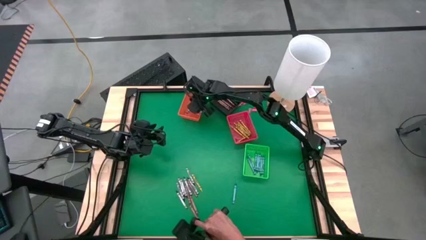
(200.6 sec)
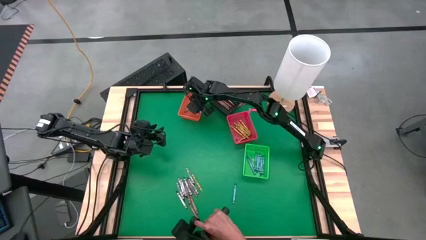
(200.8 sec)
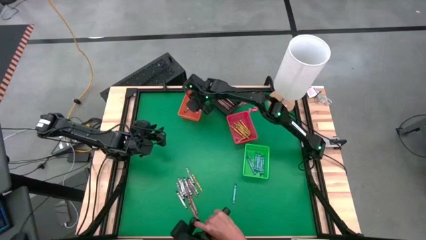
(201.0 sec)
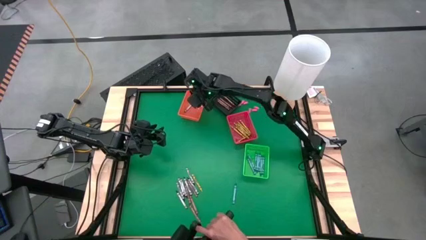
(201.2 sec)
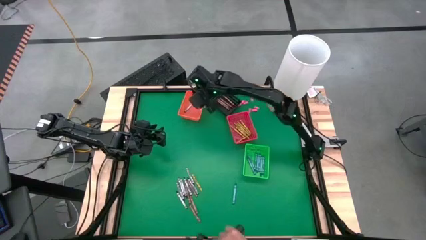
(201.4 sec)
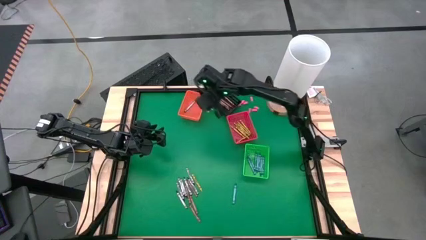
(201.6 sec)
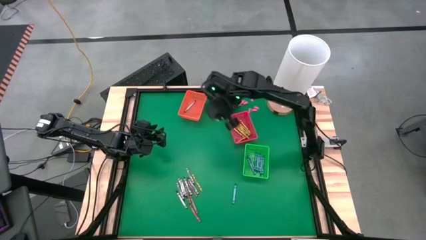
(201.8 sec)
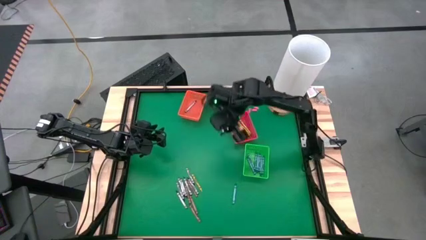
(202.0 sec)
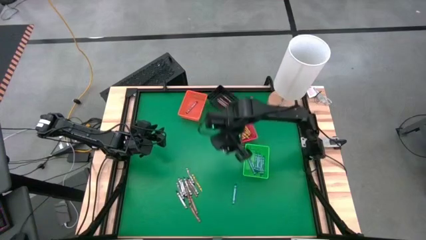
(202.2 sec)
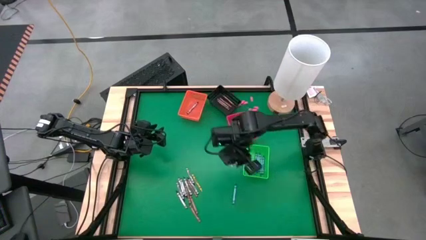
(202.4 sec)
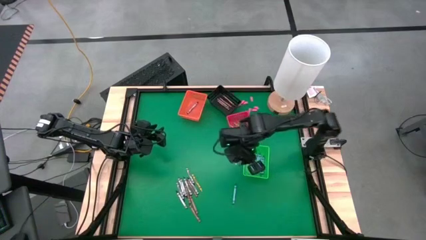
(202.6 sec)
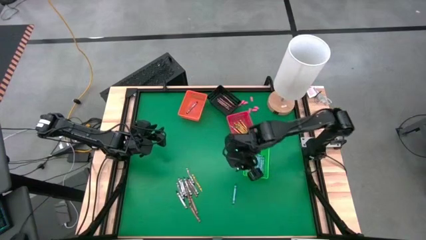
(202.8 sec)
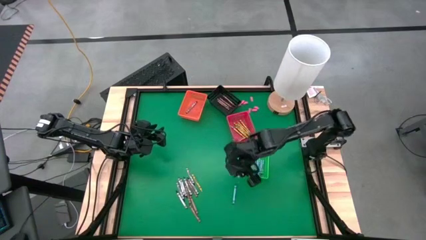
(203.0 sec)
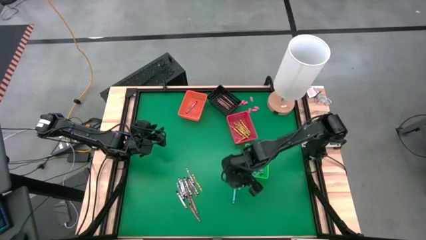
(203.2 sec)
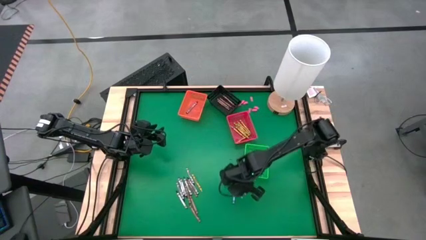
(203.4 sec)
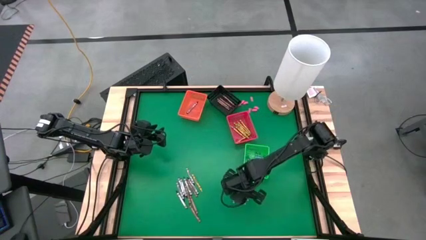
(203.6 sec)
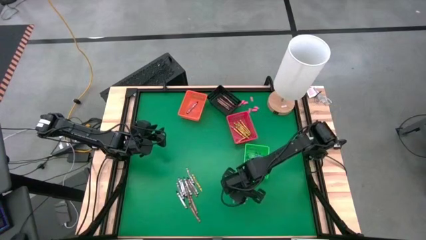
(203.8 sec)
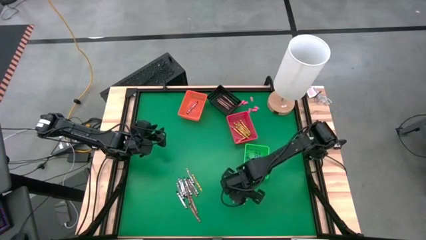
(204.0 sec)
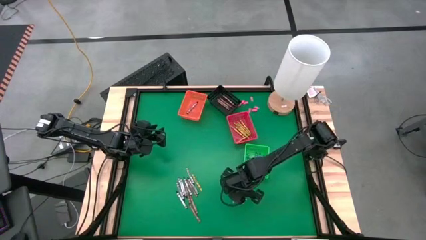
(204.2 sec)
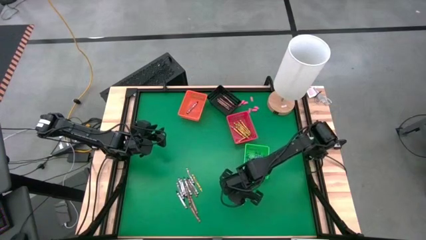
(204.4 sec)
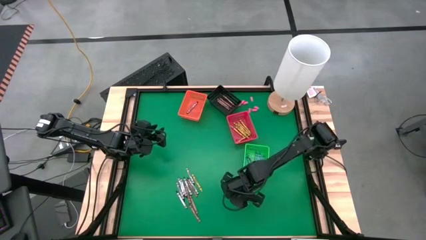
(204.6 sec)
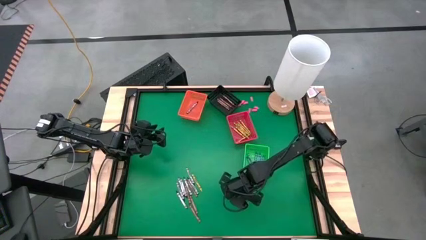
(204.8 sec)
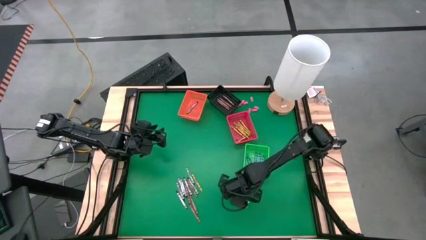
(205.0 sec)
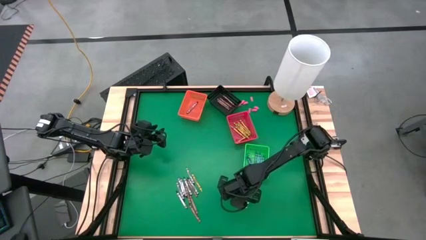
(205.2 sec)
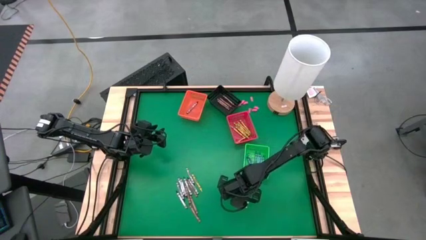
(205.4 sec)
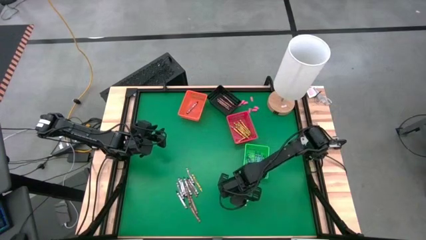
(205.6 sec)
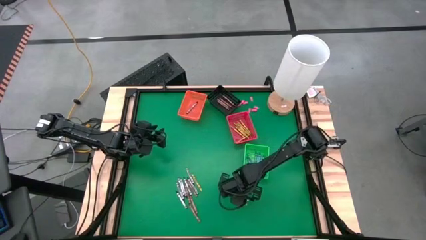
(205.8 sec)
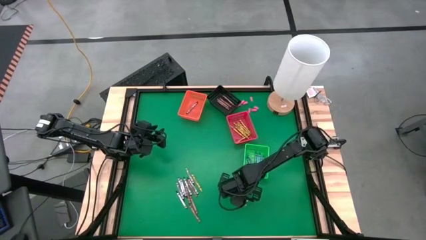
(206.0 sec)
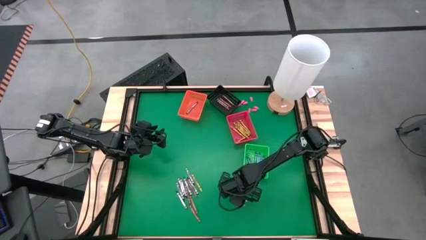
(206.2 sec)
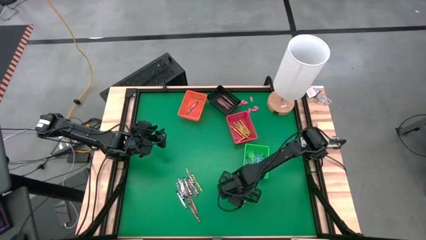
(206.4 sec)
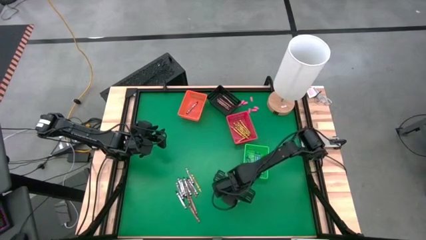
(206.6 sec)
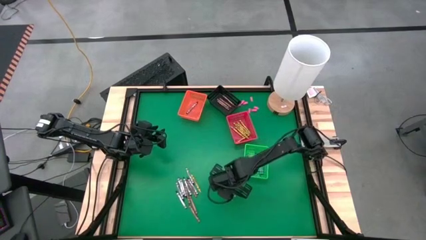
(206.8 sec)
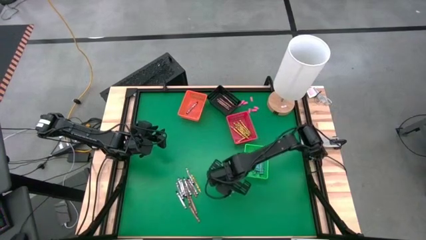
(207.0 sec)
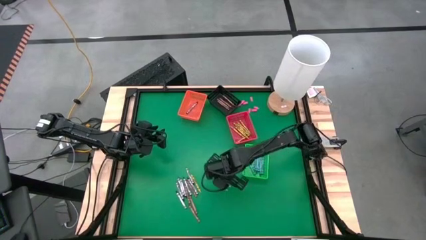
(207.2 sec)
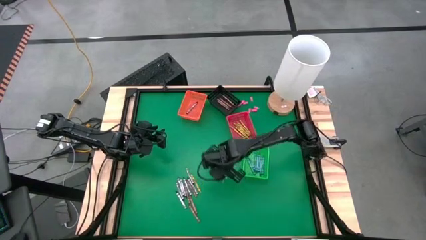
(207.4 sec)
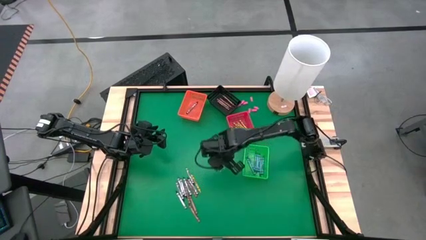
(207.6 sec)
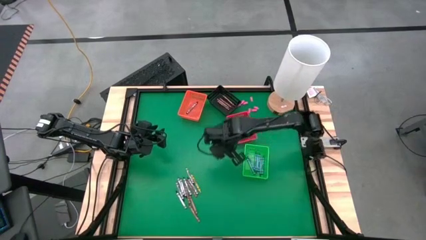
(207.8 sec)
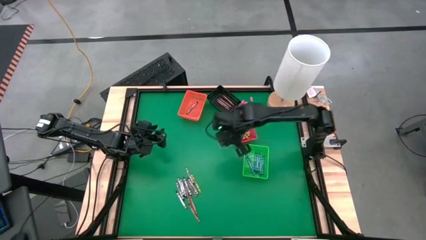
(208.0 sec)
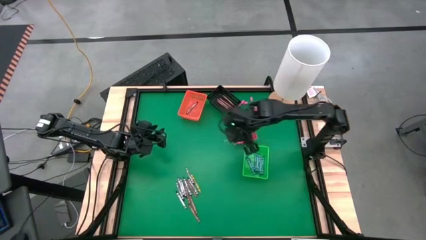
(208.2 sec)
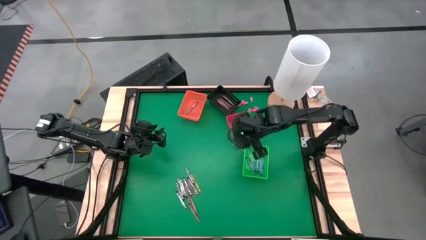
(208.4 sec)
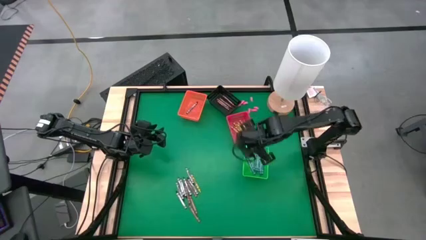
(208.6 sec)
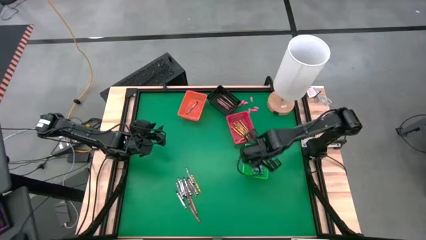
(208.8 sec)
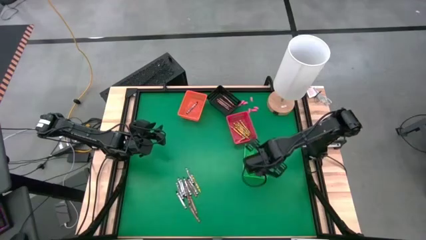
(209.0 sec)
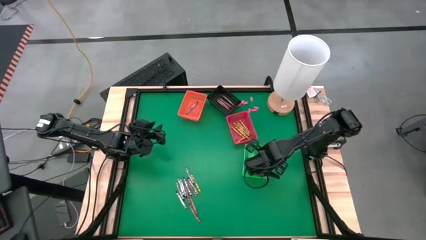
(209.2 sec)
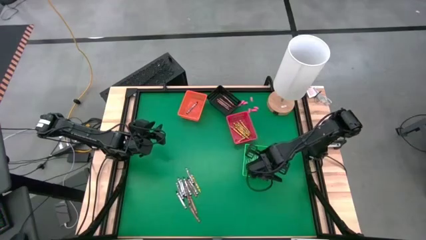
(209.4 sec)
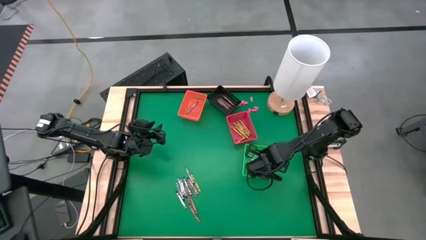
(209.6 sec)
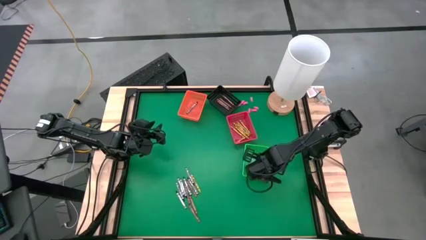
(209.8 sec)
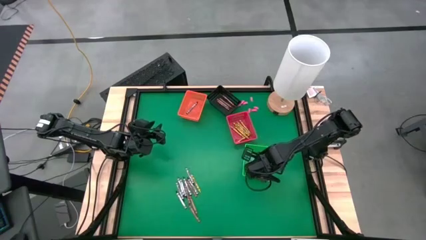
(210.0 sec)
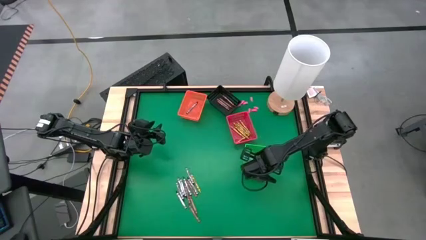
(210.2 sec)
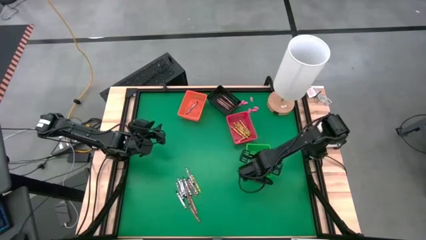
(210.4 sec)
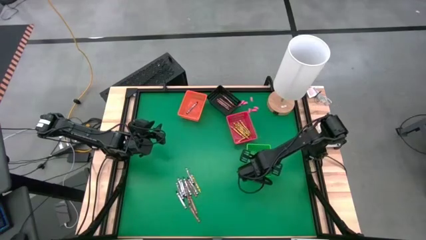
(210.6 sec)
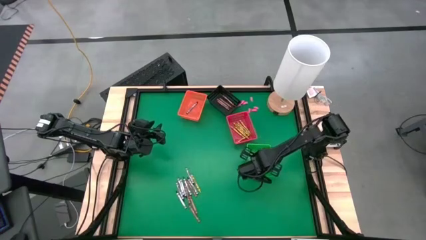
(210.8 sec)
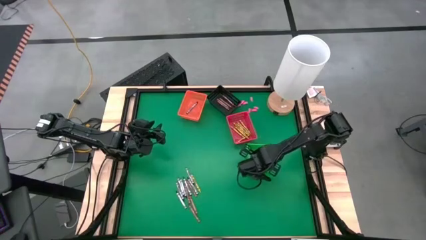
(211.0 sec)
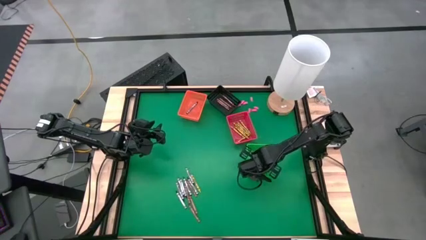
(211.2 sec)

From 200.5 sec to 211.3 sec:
Task: Sort crayons
Put the light blue crayon into the green bin
